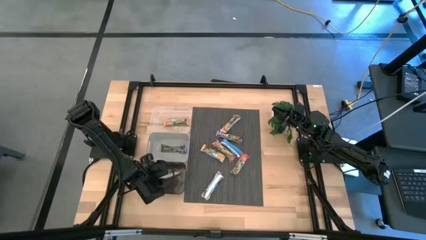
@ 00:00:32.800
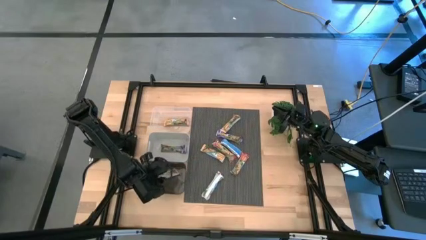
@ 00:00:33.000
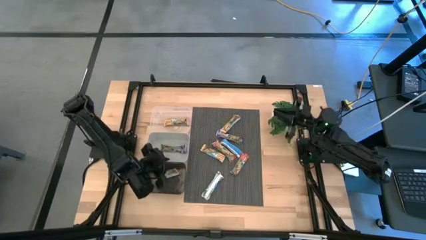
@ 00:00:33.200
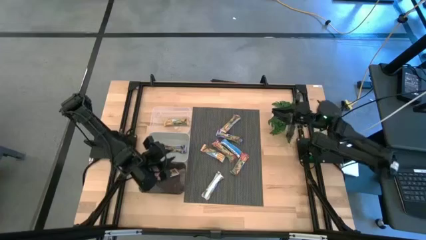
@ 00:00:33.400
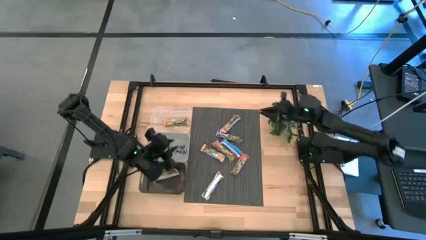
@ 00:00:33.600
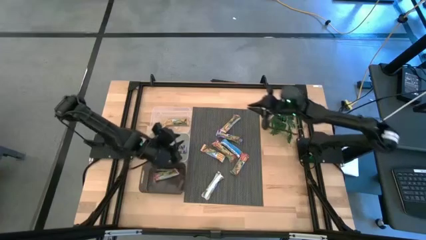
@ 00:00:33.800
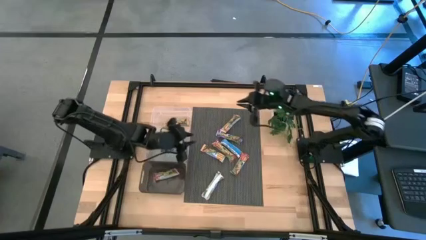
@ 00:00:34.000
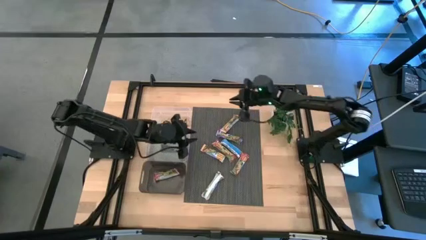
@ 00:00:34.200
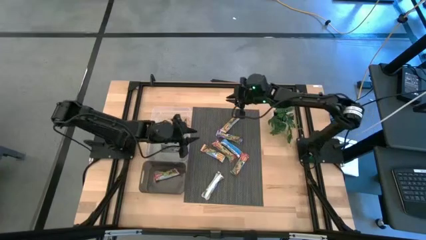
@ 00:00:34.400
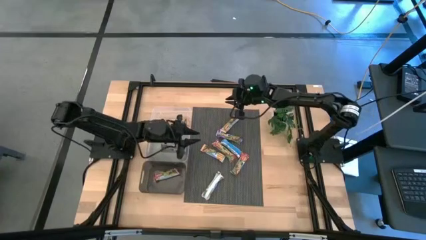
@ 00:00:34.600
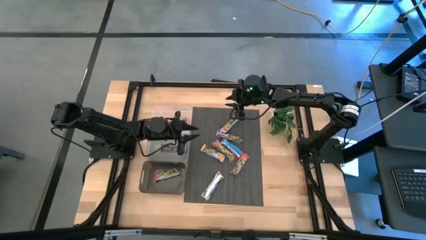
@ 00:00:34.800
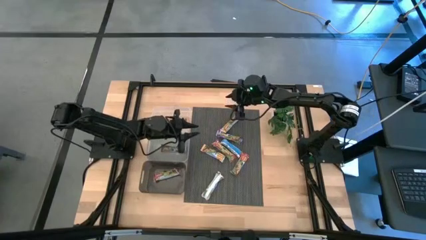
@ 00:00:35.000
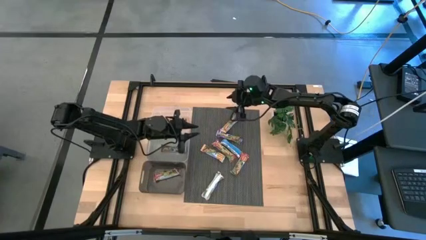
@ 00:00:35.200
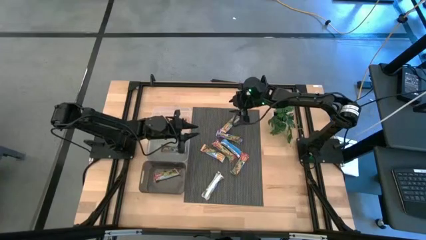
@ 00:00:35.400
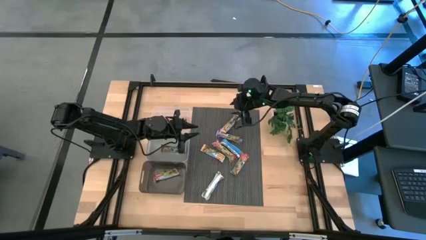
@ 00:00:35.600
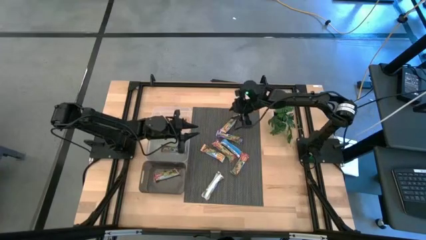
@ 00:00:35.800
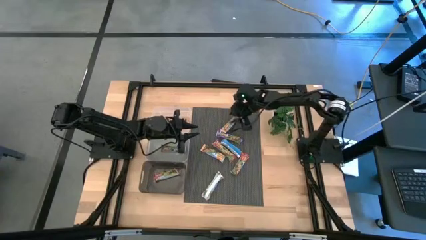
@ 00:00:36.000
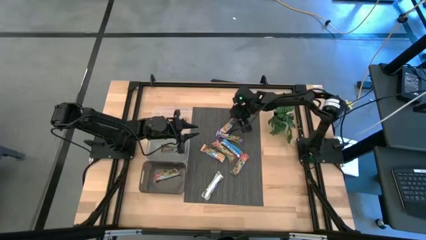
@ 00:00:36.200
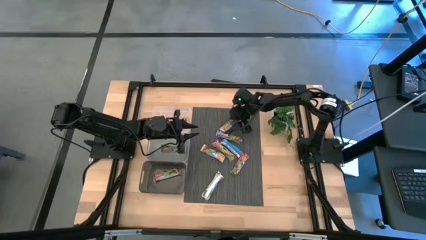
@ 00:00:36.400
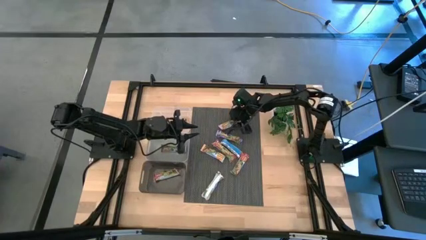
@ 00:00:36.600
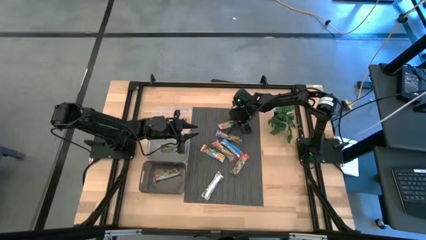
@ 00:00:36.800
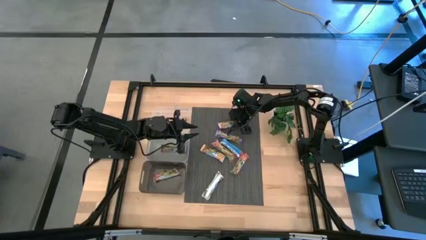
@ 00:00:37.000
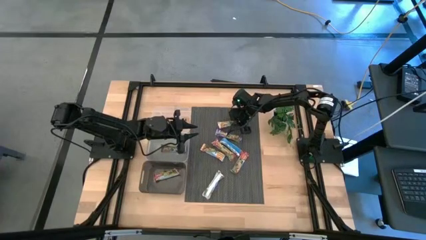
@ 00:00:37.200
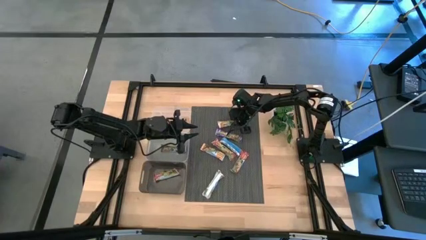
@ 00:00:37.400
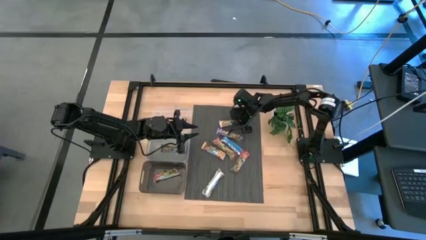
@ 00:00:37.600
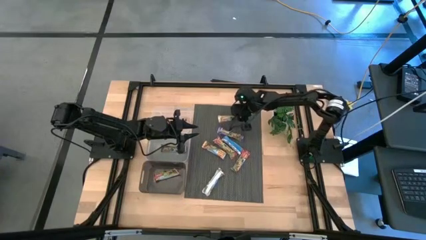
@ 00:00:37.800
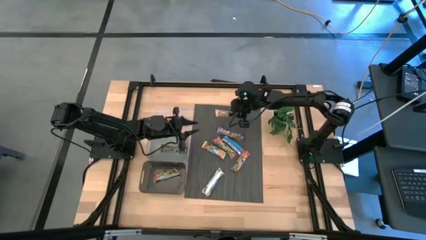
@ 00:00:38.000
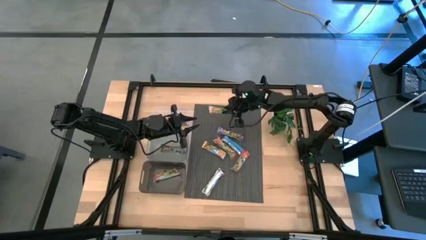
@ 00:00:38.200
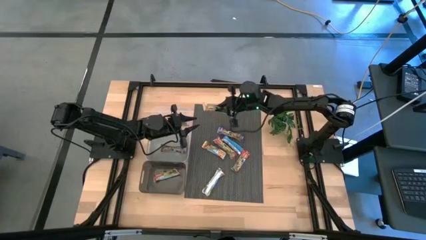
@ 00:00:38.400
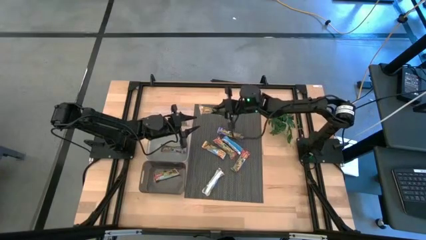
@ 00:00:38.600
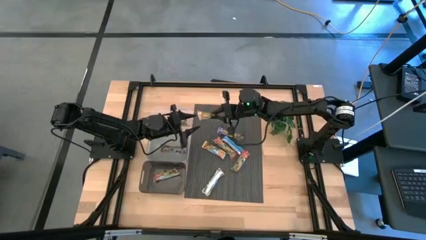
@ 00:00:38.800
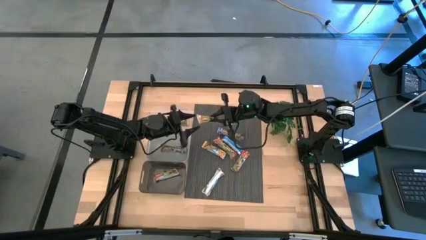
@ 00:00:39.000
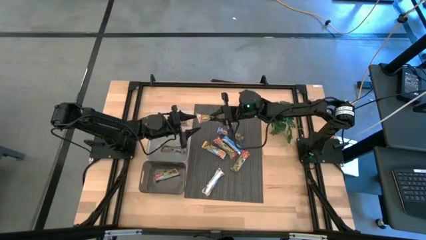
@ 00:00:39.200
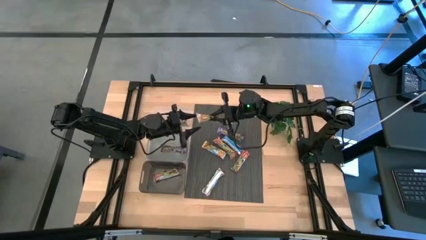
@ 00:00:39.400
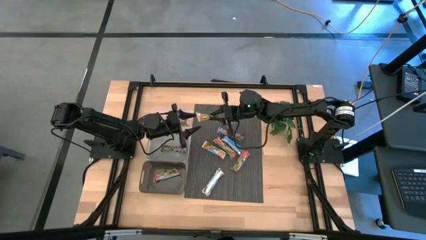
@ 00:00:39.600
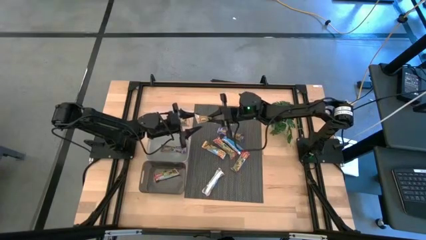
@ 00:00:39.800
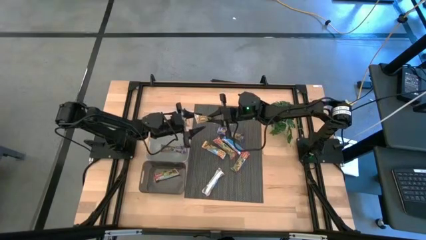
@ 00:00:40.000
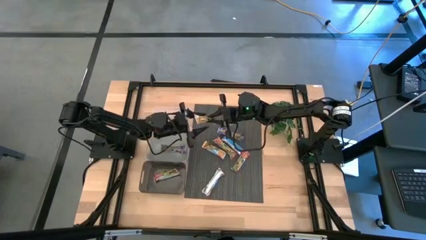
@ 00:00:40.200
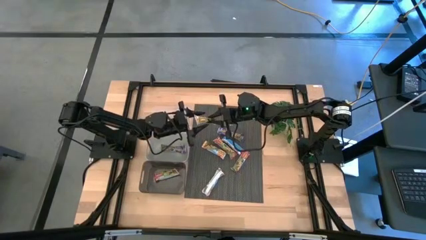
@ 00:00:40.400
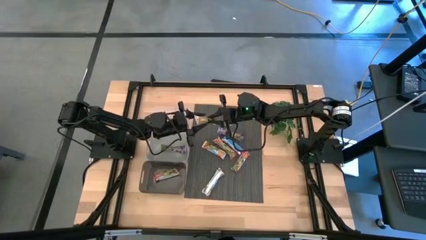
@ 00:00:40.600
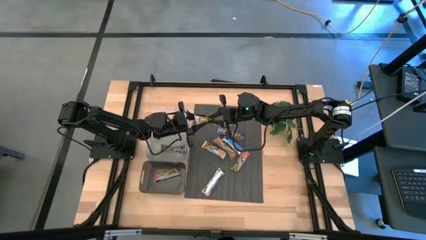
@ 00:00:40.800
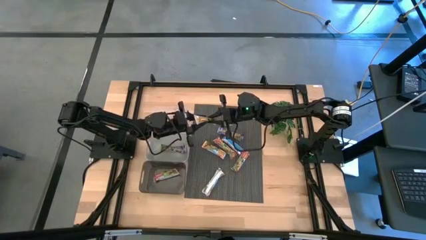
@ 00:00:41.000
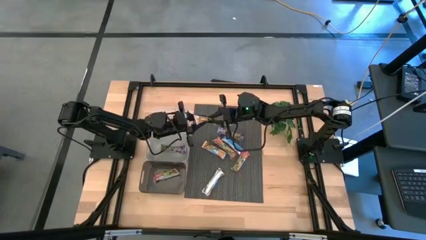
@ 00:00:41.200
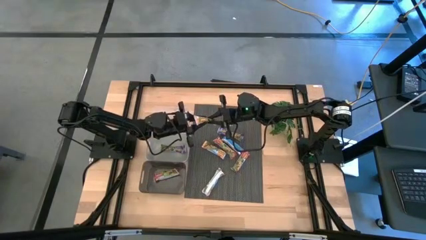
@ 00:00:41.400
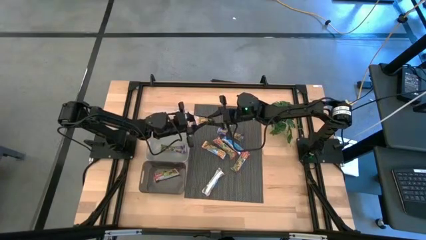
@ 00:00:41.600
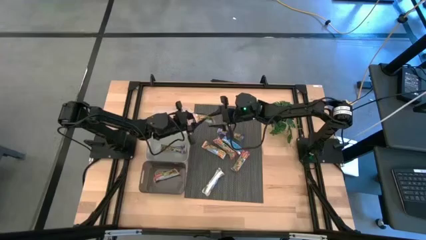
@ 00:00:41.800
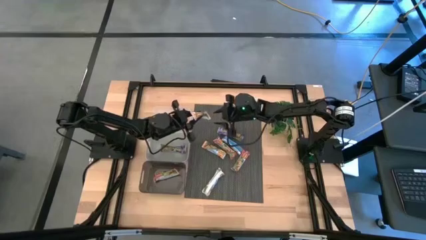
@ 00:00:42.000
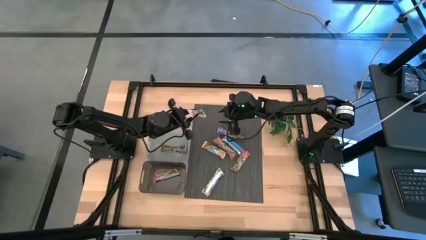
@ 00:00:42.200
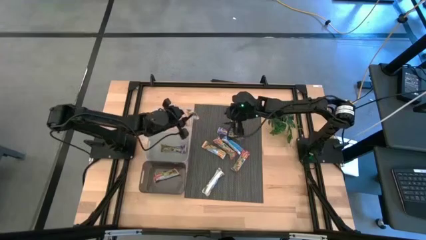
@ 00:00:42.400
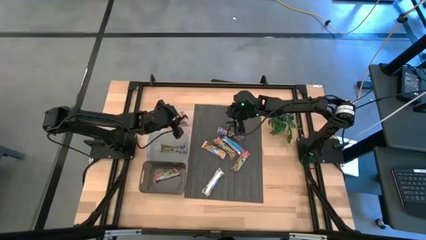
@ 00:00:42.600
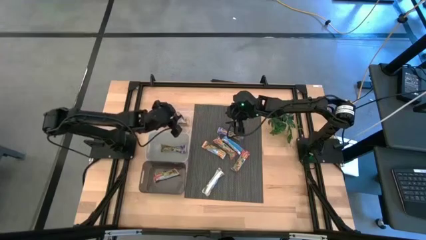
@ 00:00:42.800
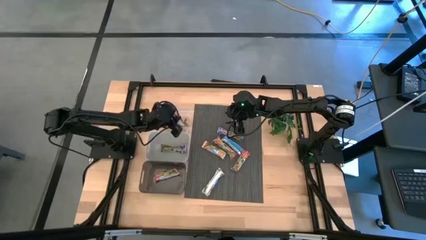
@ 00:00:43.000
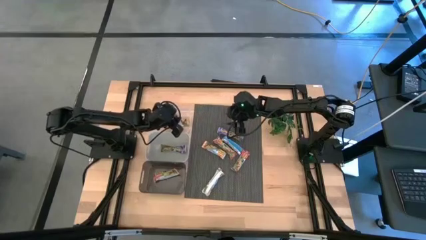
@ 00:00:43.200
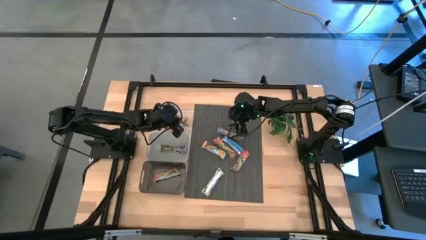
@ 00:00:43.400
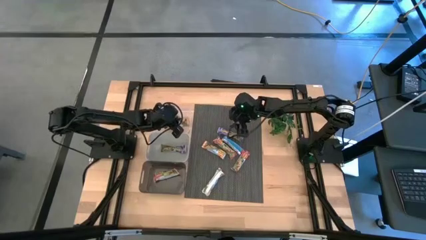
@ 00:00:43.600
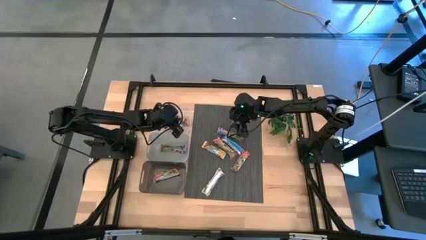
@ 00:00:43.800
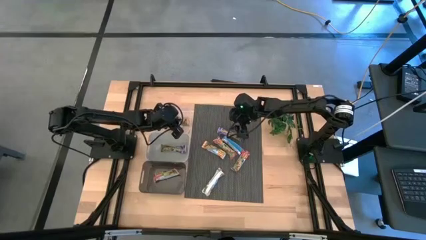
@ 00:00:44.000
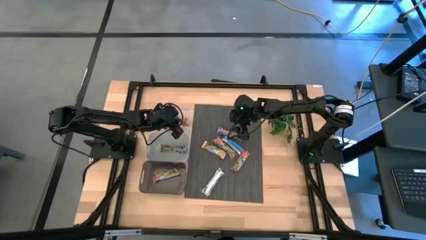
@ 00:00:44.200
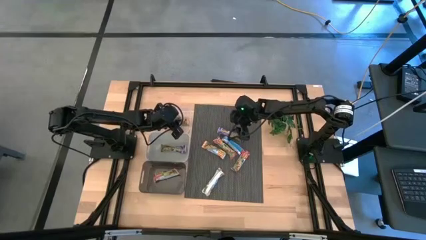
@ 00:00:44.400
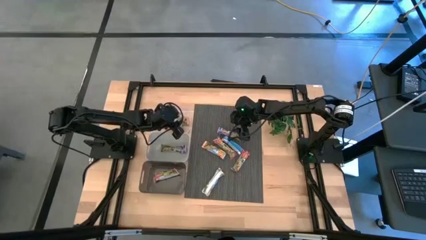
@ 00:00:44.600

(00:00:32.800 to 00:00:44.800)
Task: Pick and place Granola Bars by type
Put the yellow granola bar into the transparent bin
